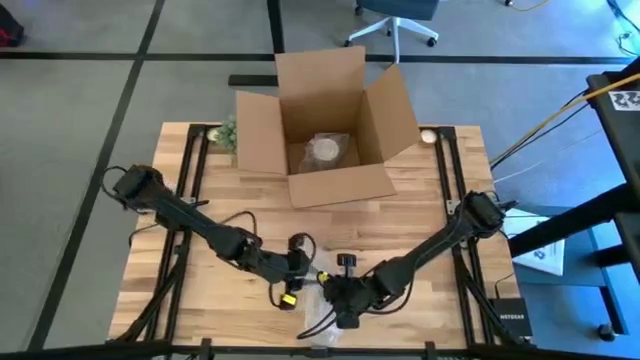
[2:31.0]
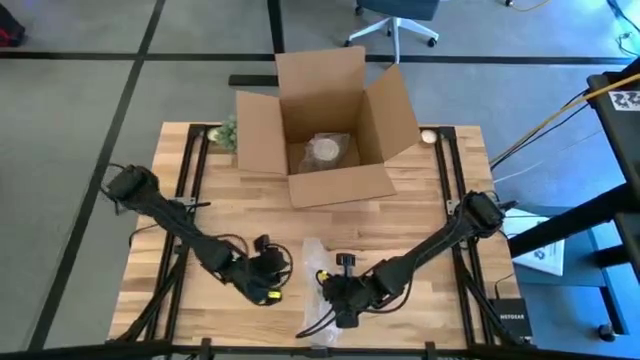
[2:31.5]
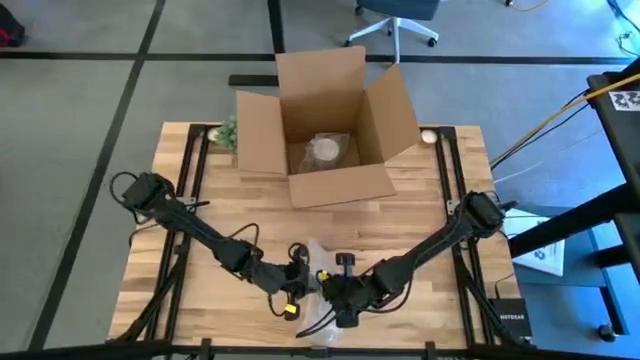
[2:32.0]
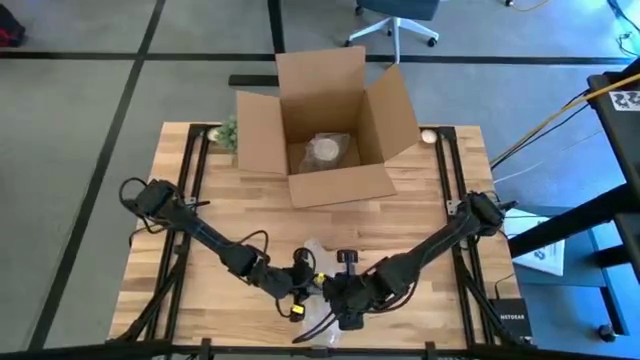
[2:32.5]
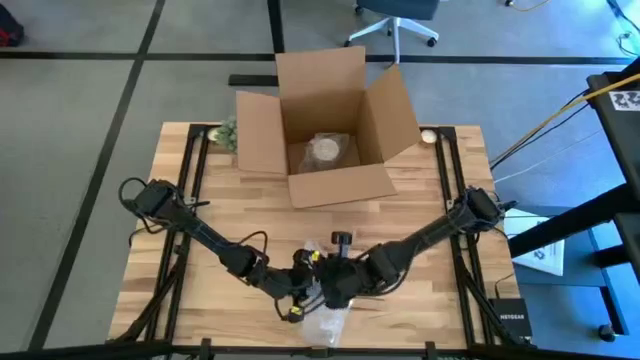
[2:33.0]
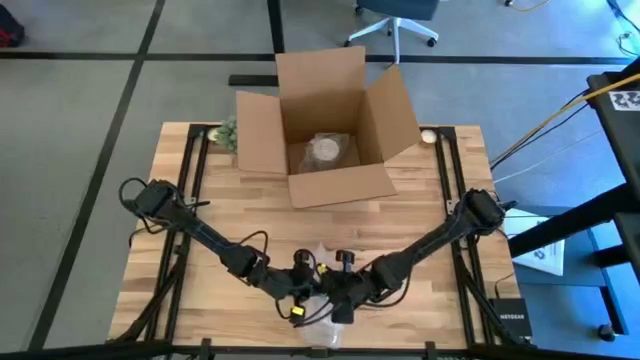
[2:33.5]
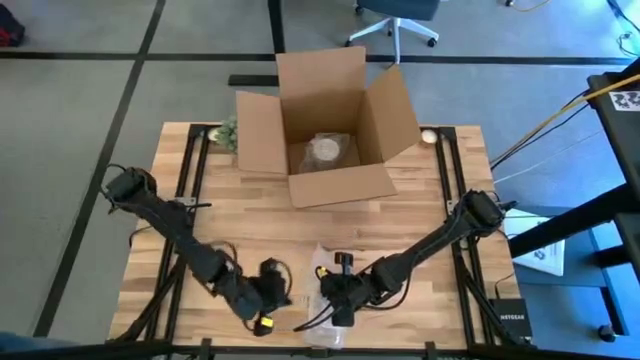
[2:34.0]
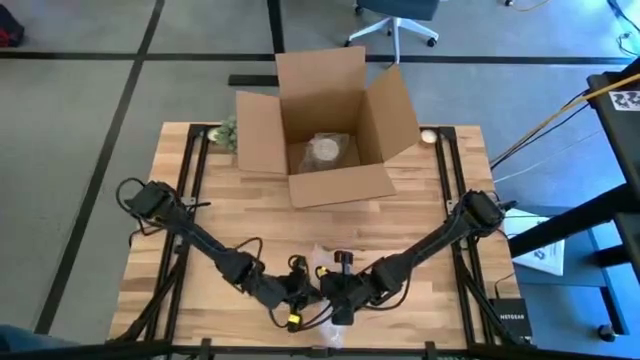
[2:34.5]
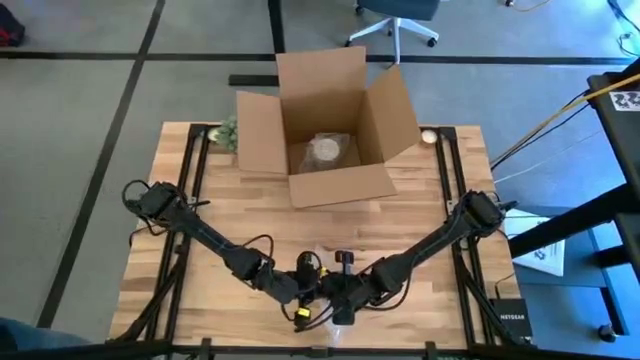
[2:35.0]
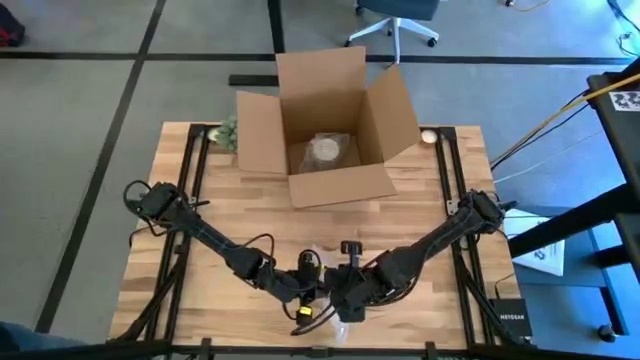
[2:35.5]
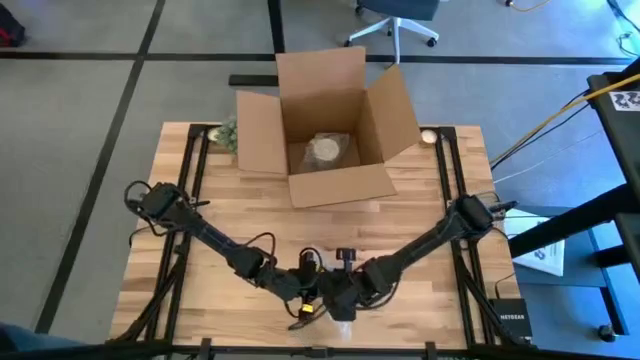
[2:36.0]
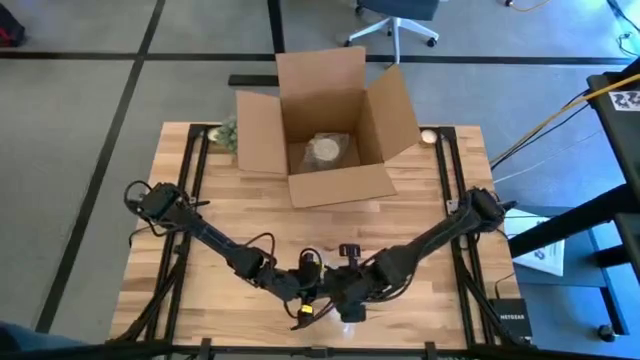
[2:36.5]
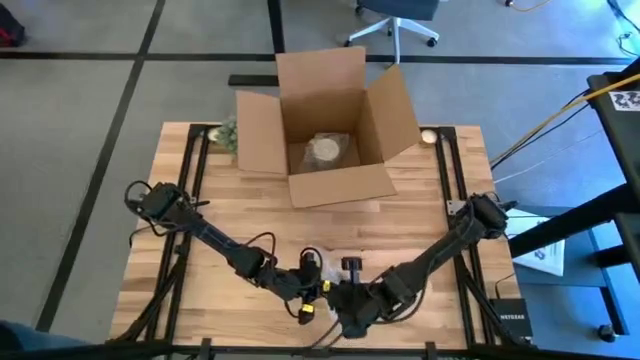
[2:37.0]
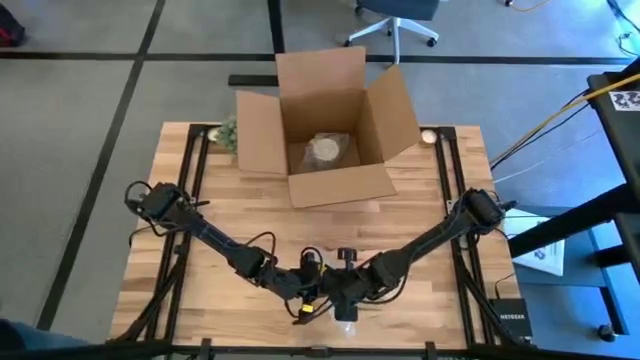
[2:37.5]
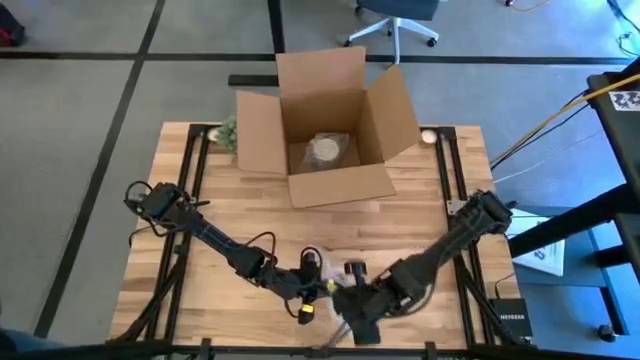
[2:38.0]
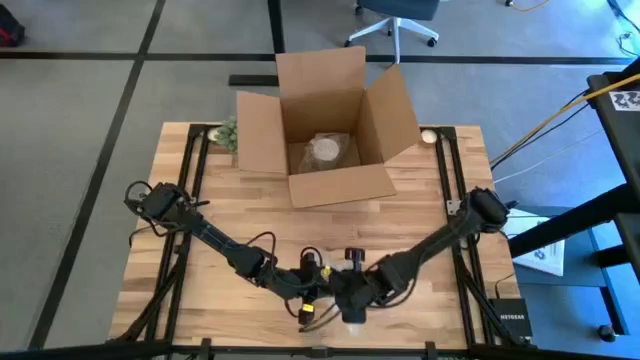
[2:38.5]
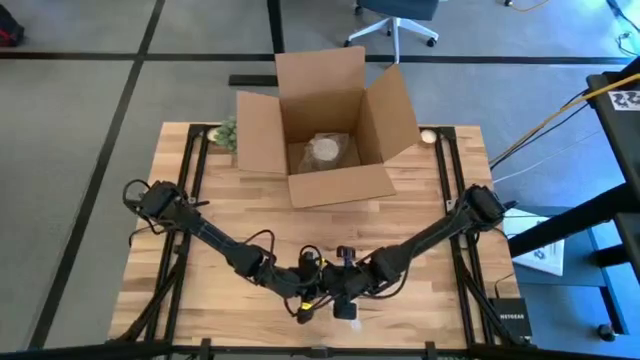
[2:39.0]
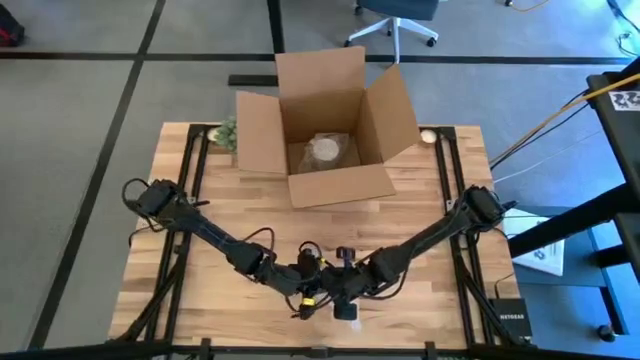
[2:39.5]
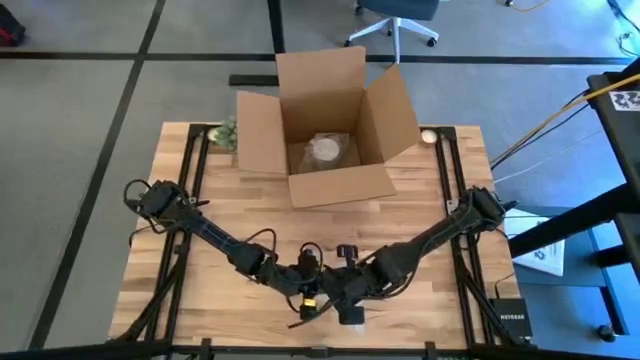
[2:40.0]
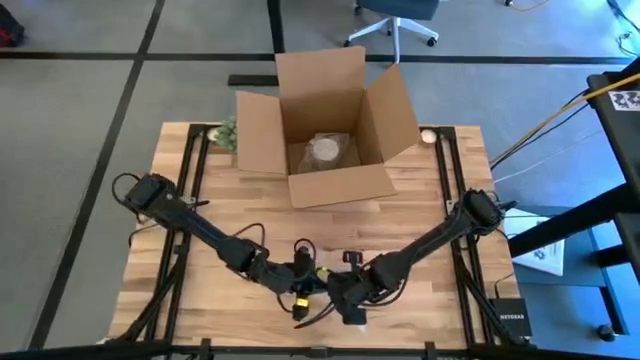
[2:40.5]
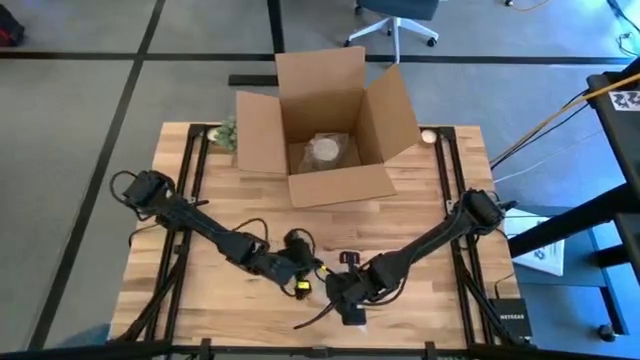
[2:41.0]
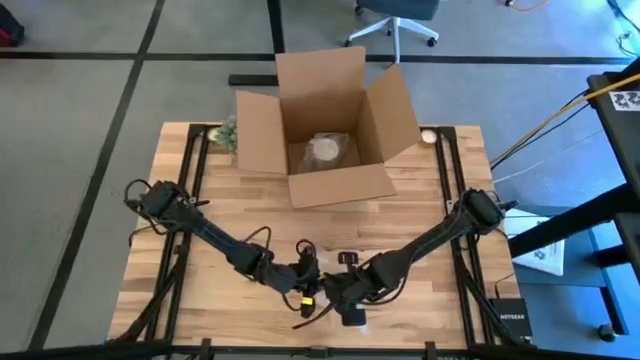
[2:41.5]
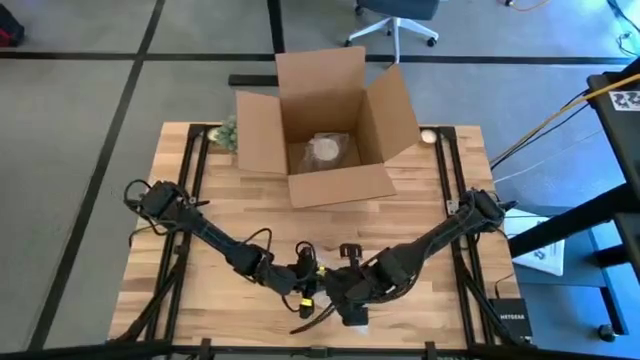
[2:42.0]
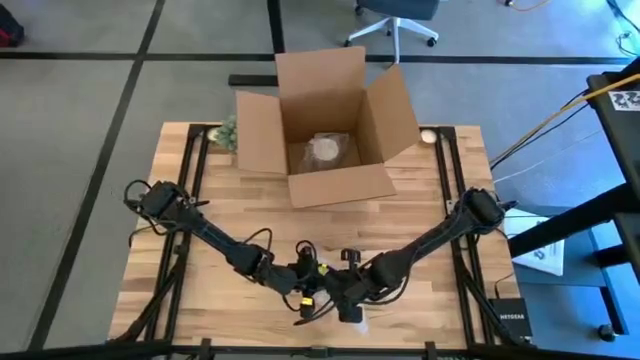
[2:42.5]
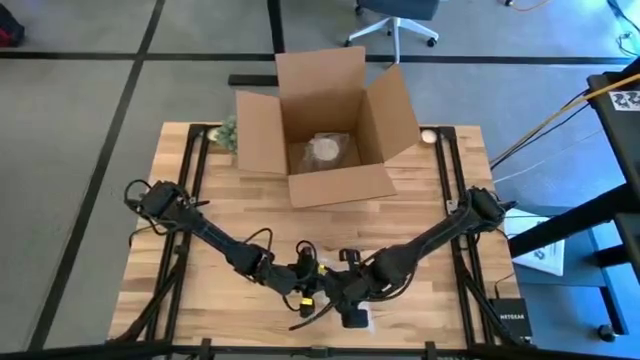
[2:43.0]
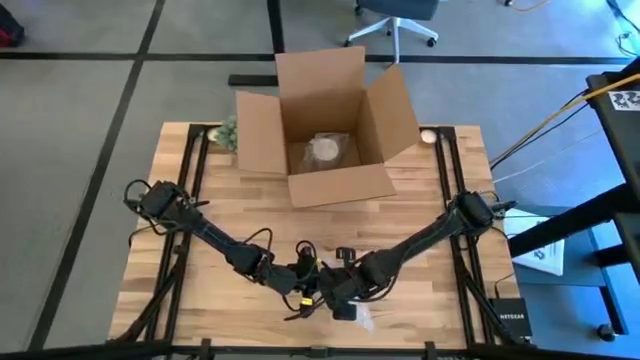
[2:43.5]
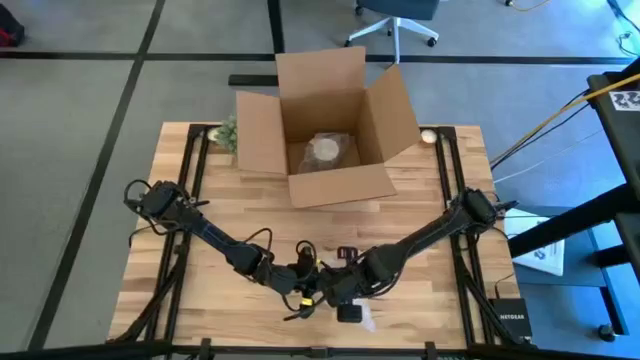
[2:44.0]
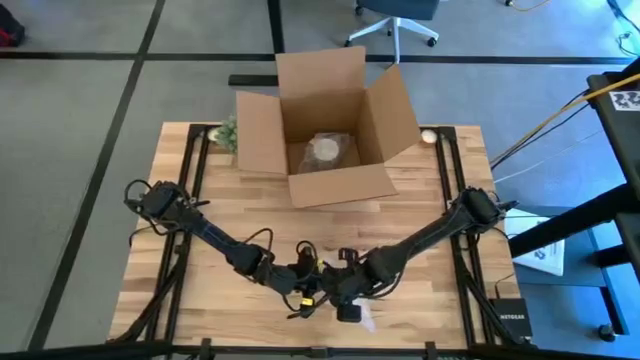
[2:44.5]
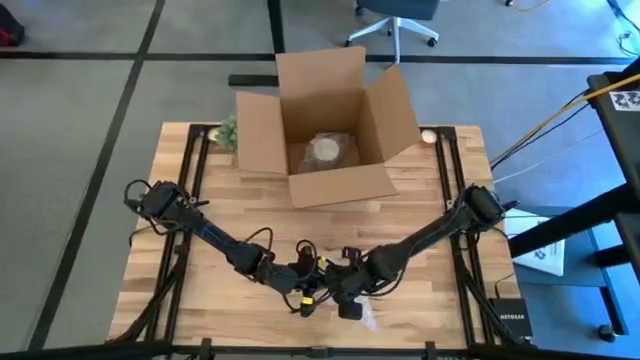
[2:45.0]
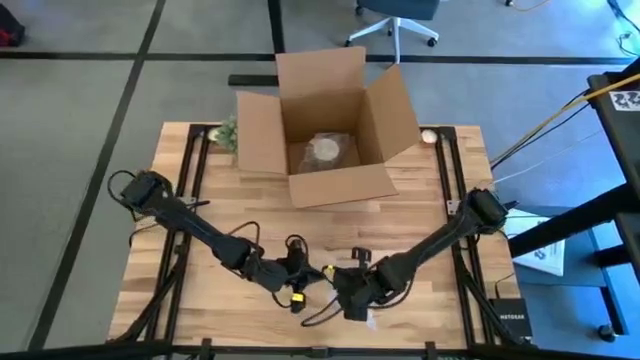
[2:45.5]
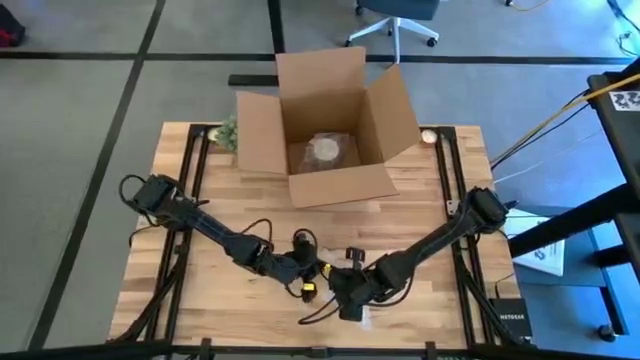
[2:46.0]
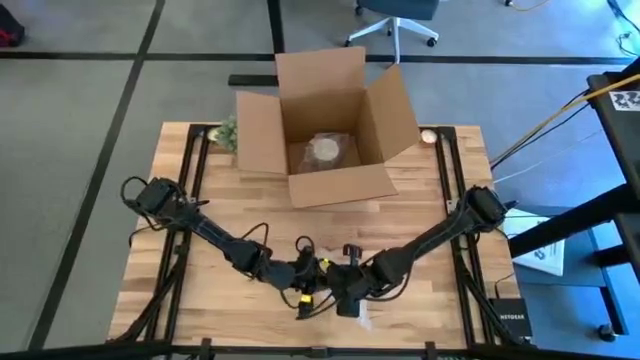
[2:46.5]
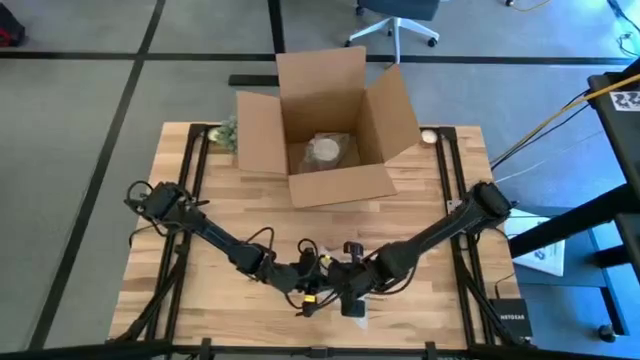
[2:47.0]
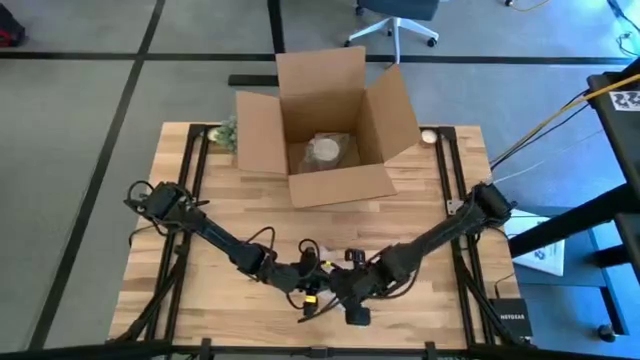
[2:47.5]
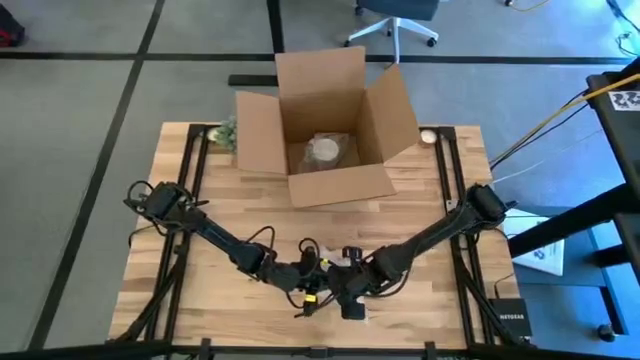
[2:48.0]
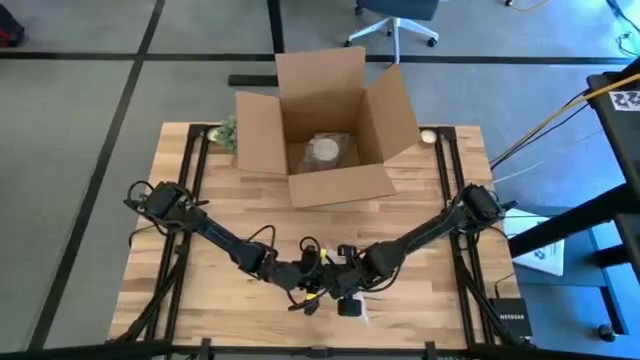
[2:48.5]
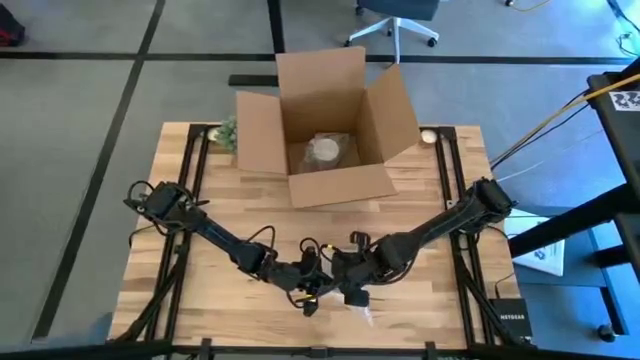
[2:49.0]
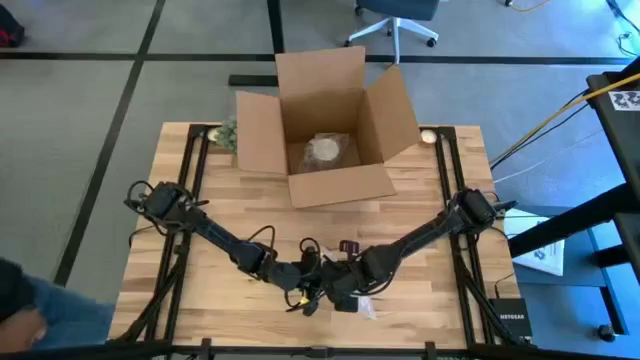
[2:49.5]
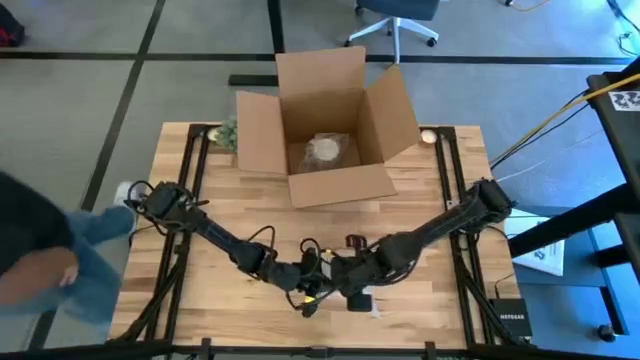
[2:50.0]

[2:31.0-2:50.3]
Task: wrap mug
Wrap the orange mug with transparent bubble wrap

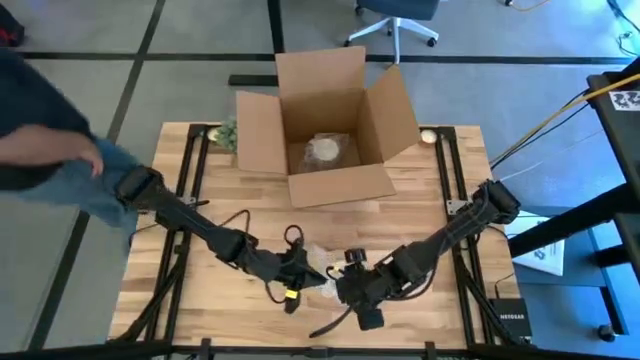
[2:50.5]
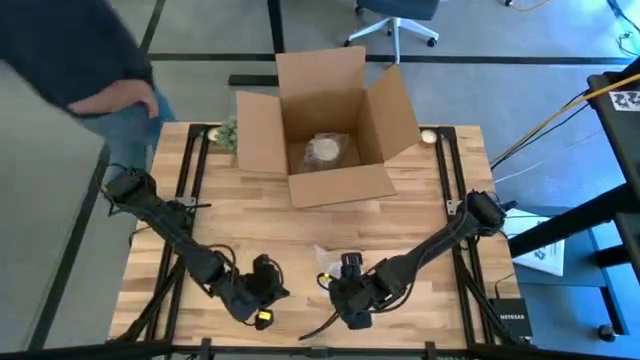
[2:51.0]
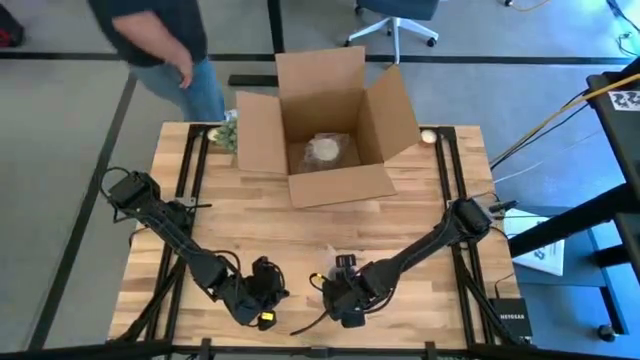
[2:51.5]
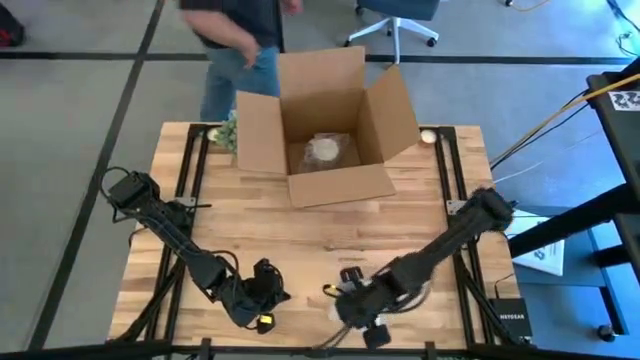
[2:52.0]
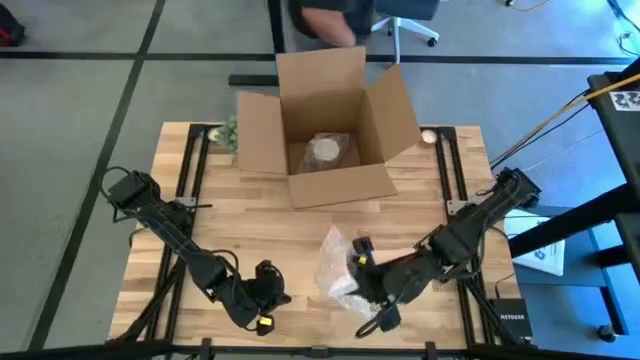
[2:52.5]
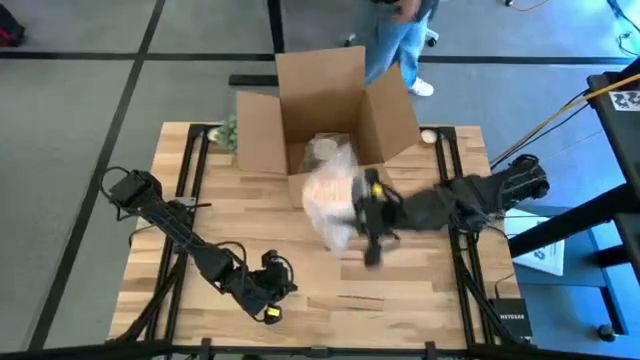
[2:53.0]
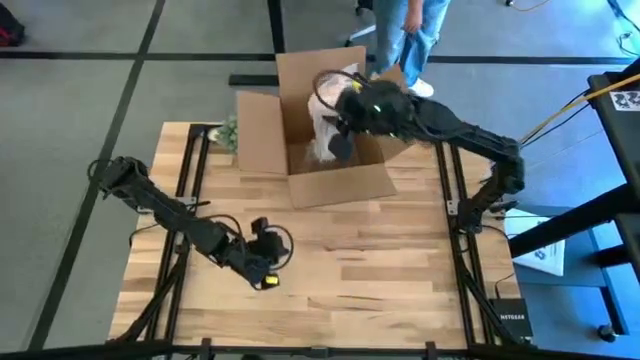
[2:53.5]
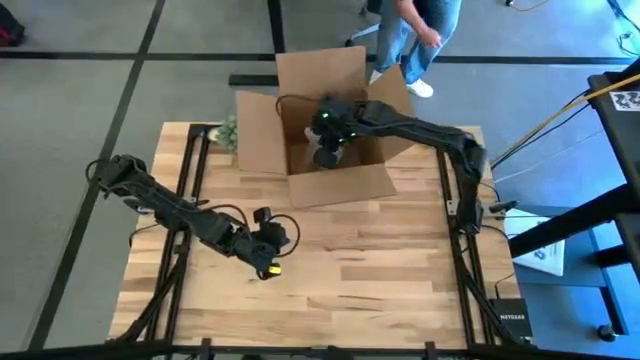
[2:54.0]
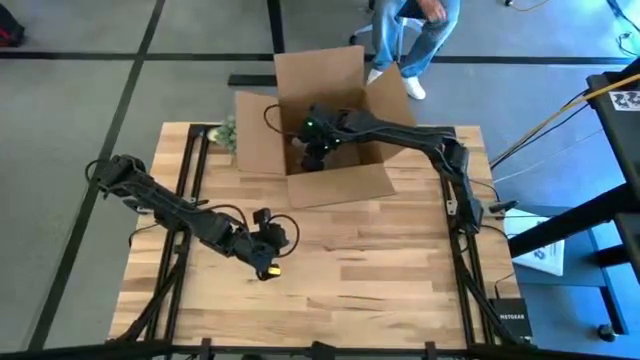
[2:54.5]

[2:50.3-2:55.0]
Put the wrapped orange mug into the box
